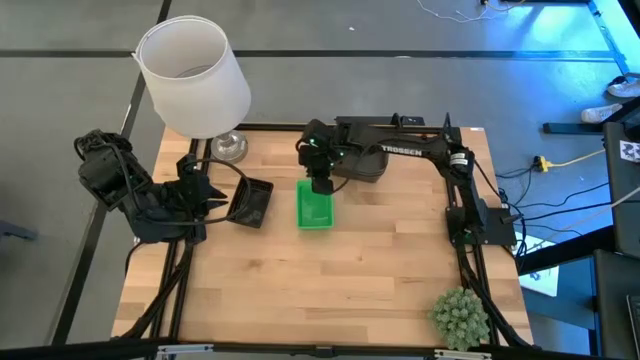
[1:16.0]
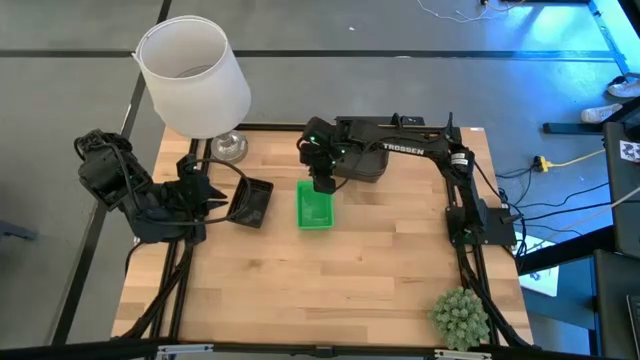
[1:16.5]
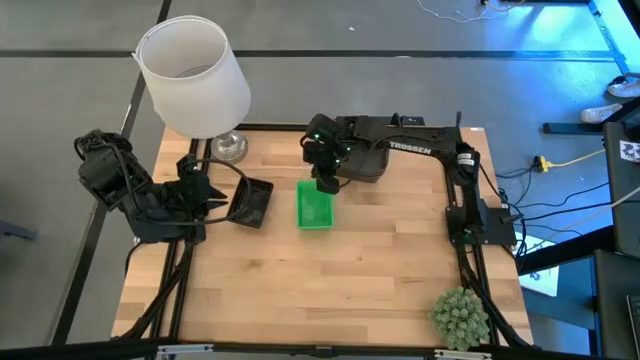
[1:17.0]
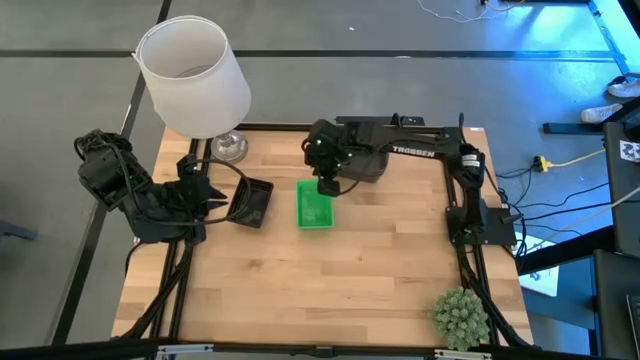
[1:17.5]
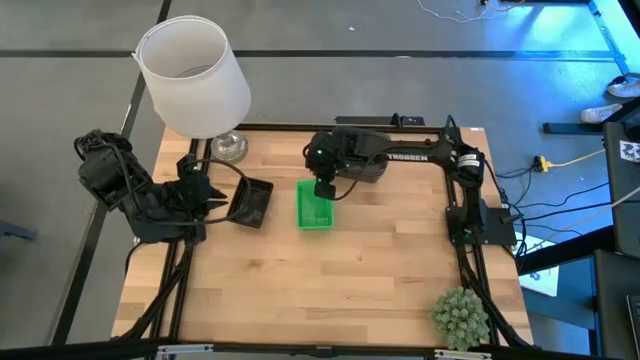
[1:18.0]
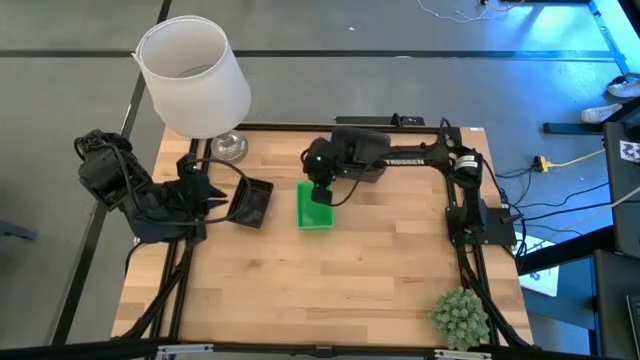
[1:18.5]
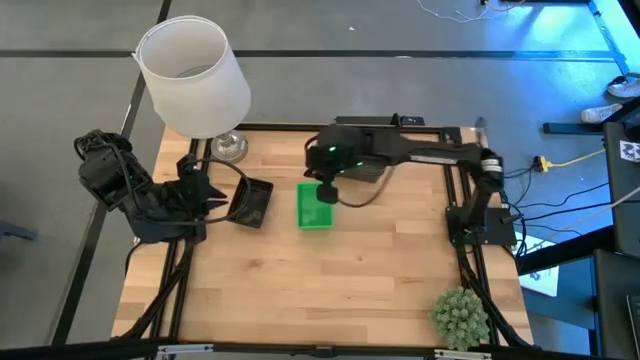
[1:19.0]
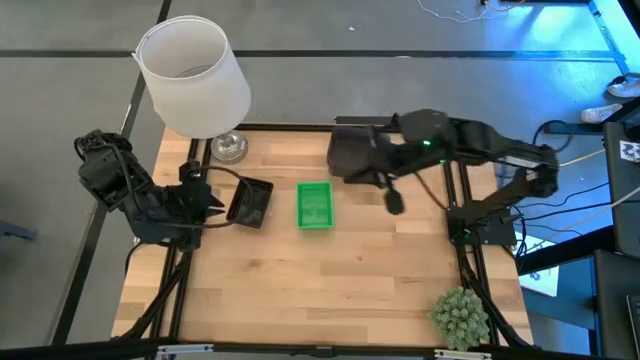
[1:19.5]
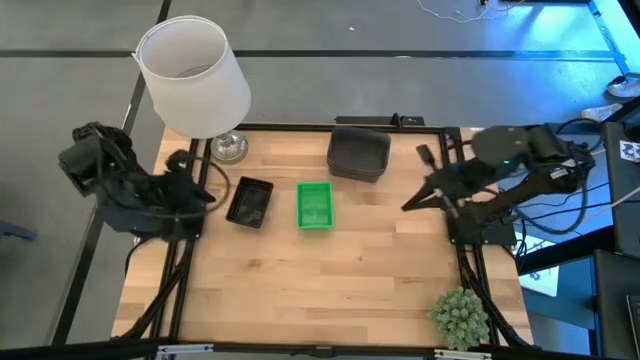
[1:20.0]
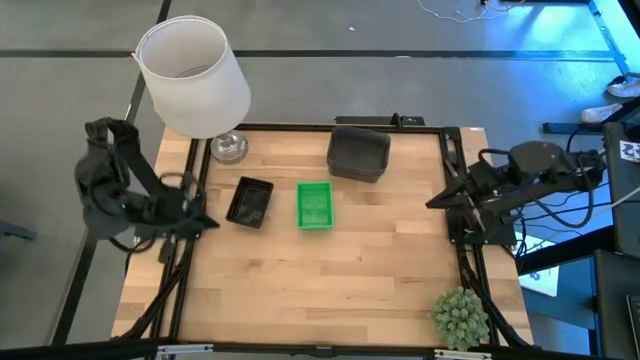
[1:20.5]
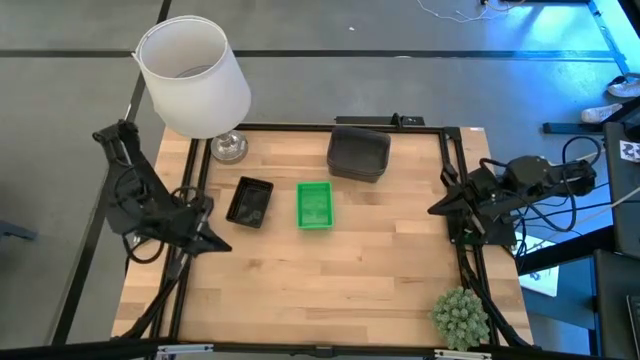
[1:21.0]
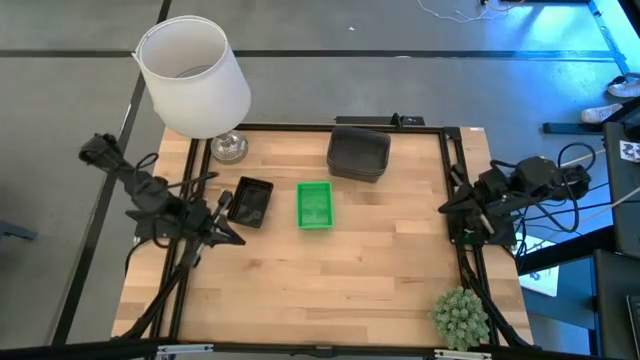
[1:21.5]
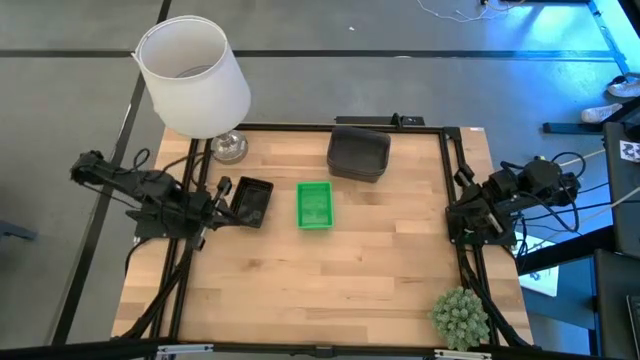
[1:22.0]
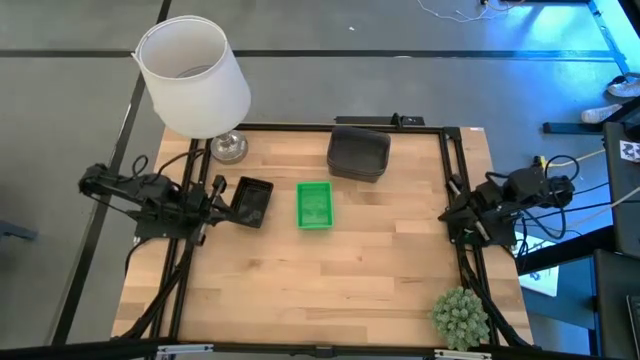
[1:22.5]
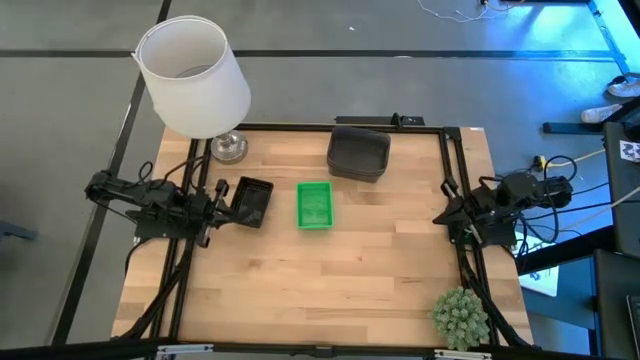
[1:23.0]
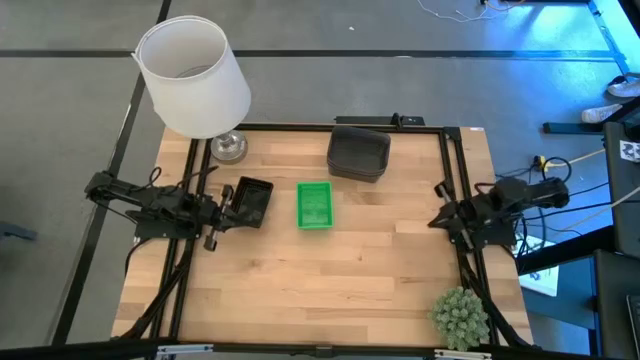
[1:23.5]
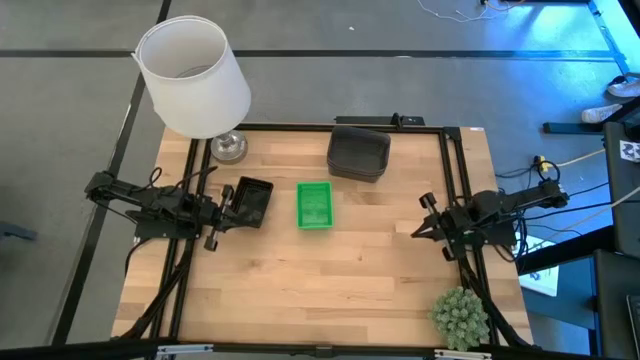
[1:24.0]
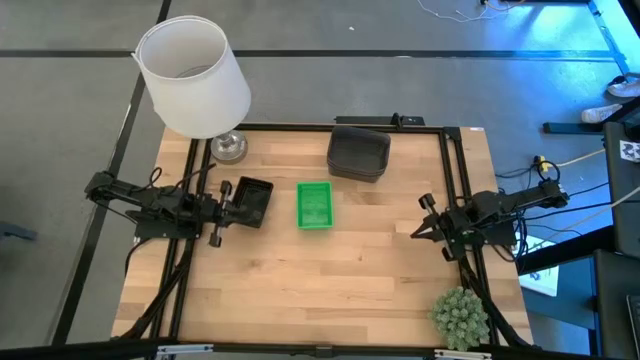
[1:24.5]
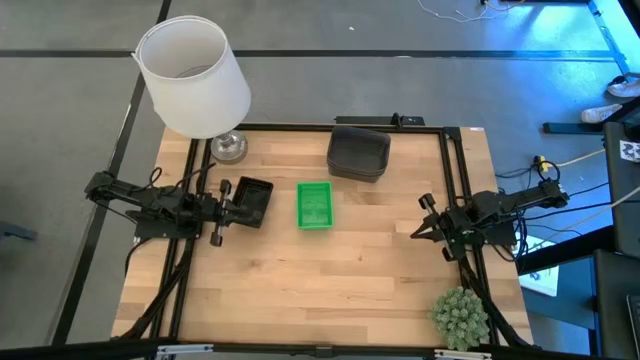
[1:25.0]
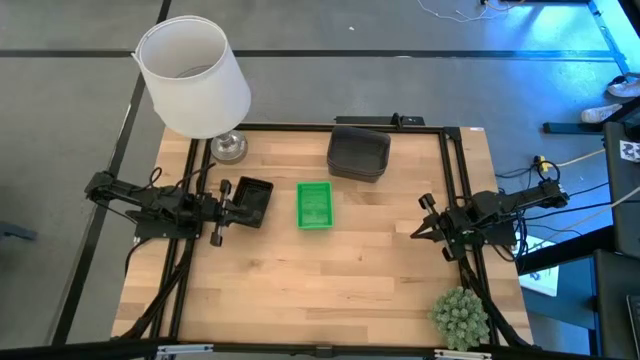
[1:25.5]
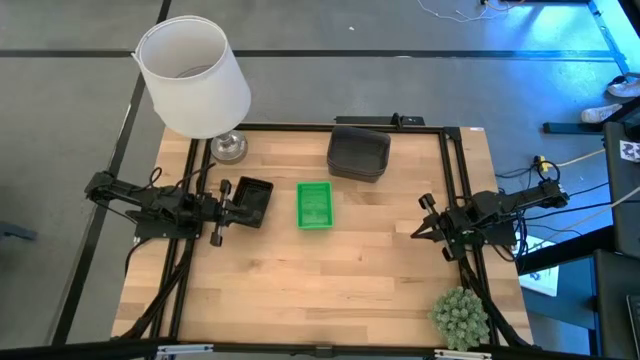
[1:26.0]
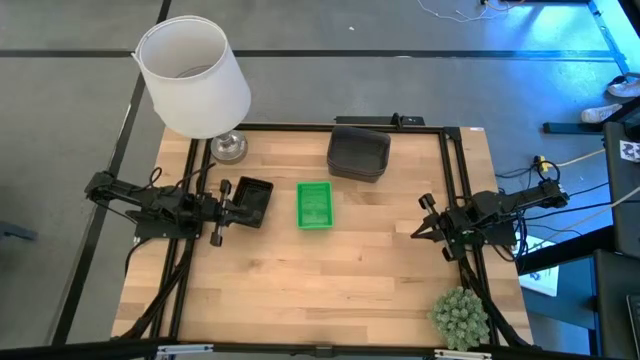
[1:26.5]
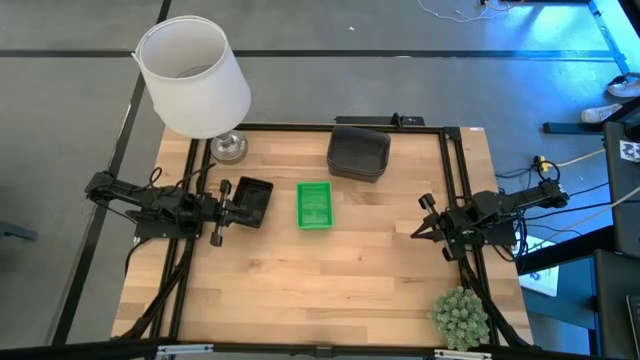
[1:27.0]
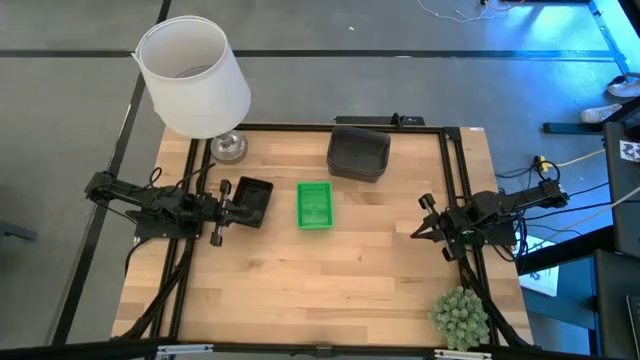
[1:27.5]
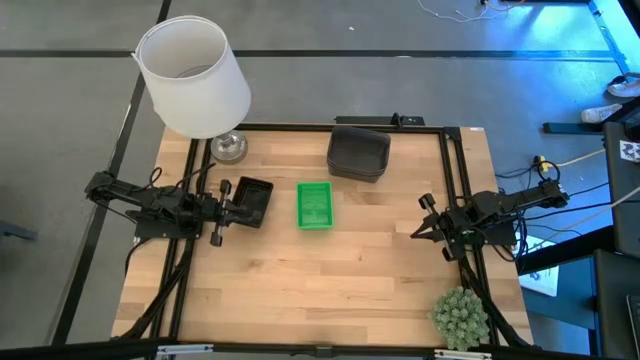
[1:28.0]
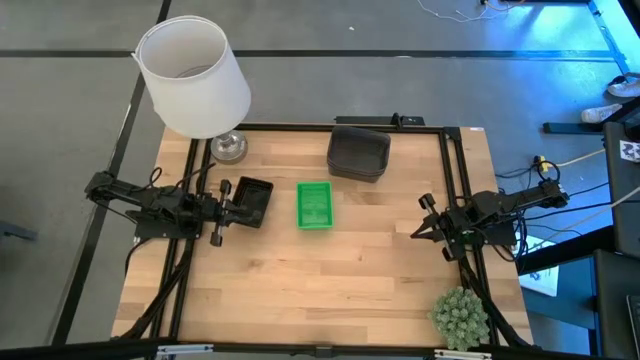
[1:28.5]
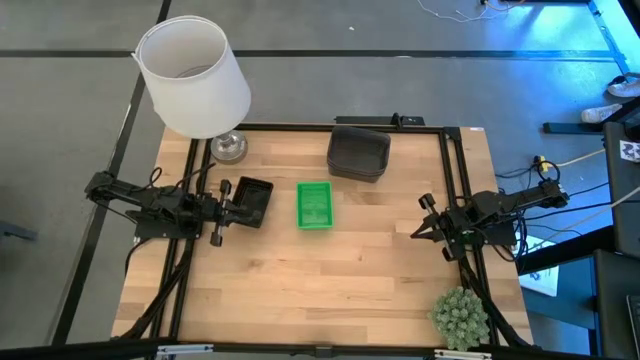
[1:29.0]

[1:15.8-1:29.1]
Return to Home Position

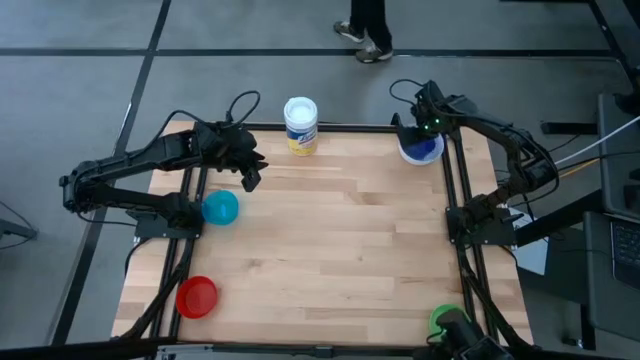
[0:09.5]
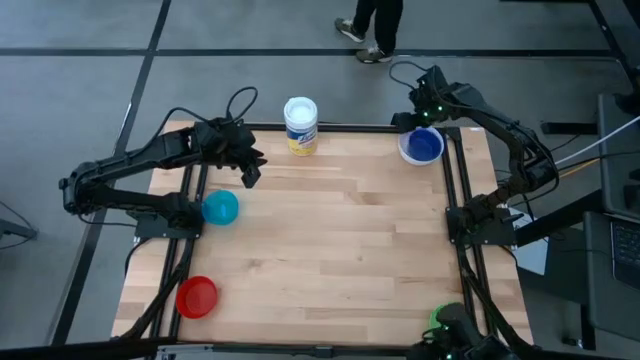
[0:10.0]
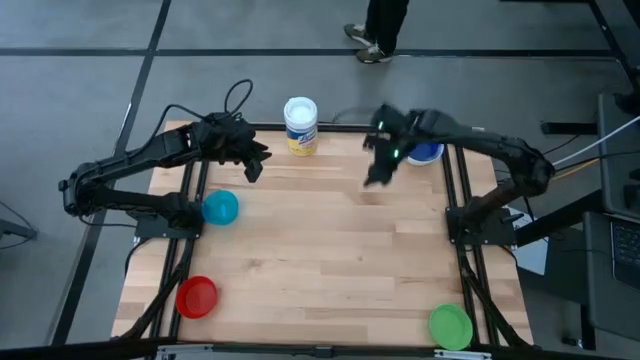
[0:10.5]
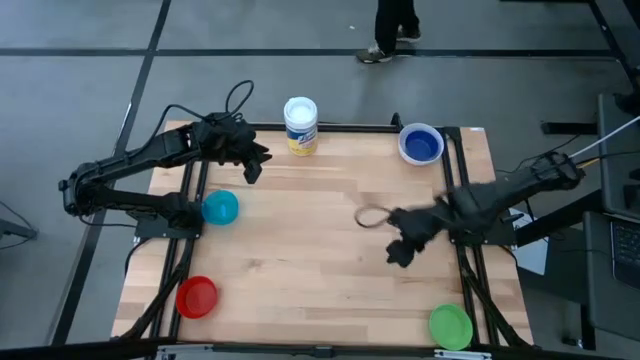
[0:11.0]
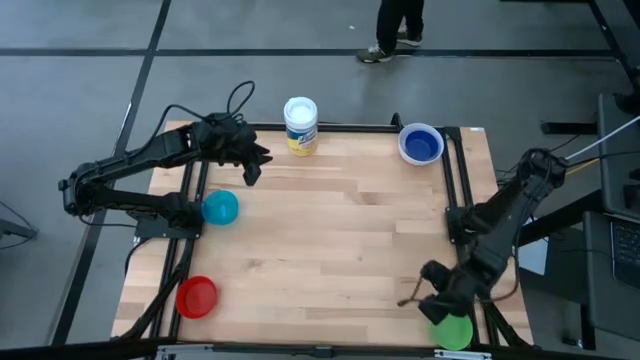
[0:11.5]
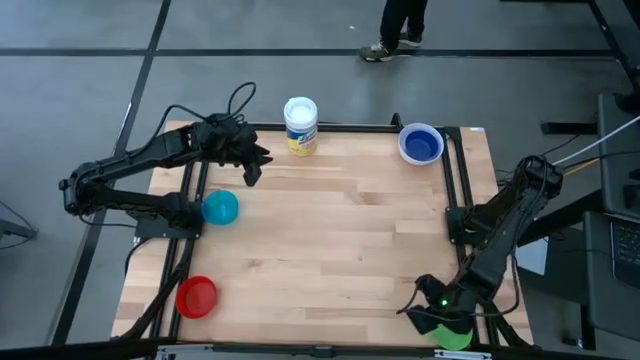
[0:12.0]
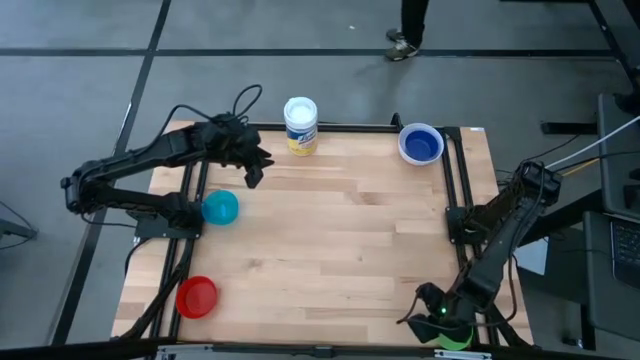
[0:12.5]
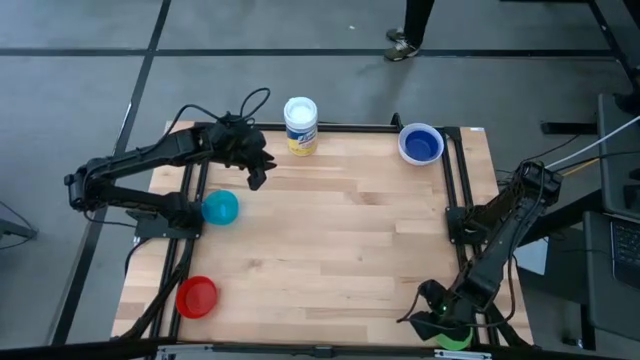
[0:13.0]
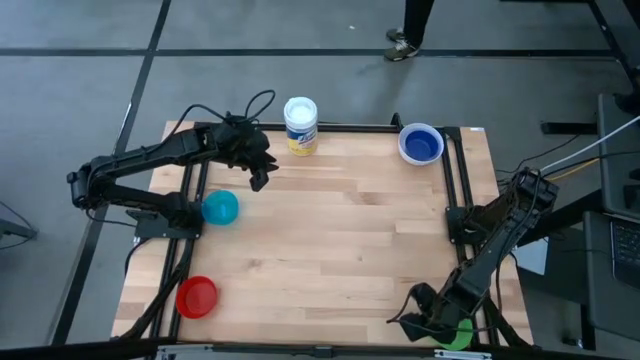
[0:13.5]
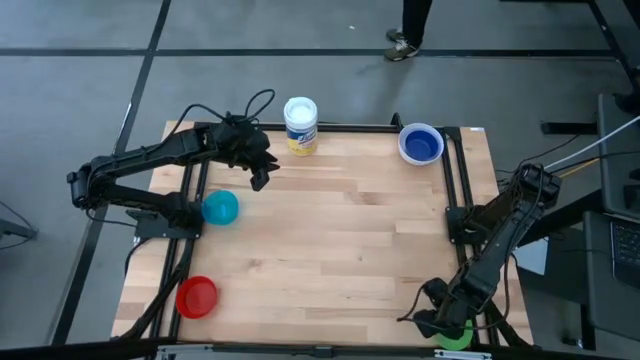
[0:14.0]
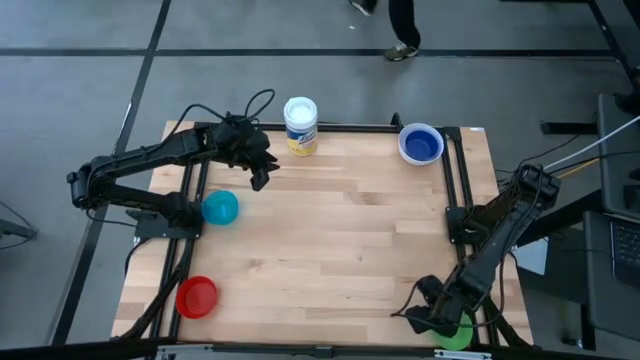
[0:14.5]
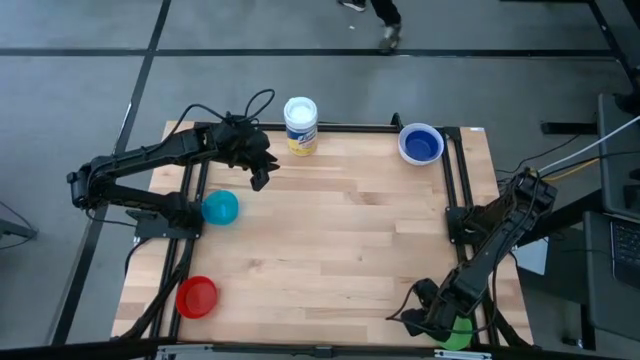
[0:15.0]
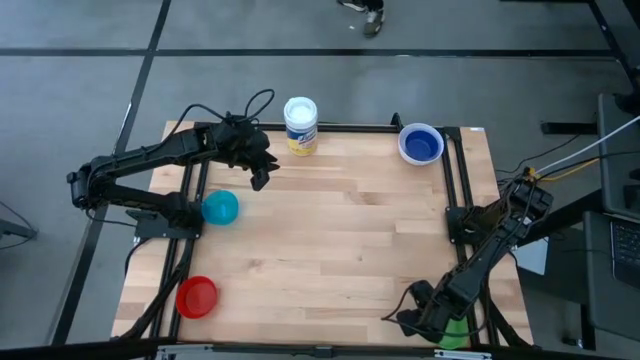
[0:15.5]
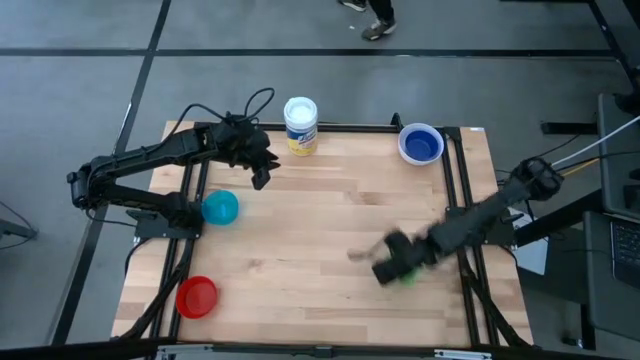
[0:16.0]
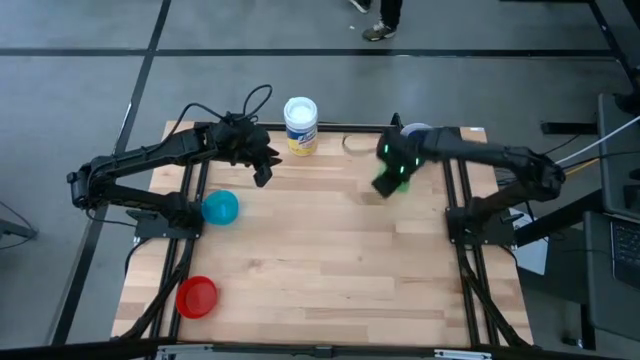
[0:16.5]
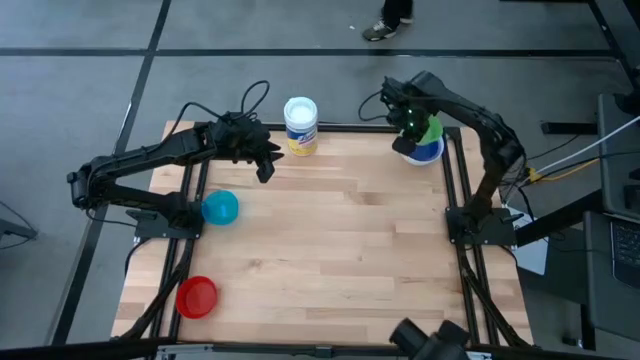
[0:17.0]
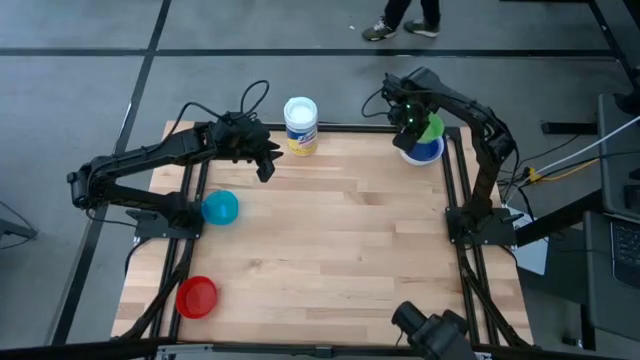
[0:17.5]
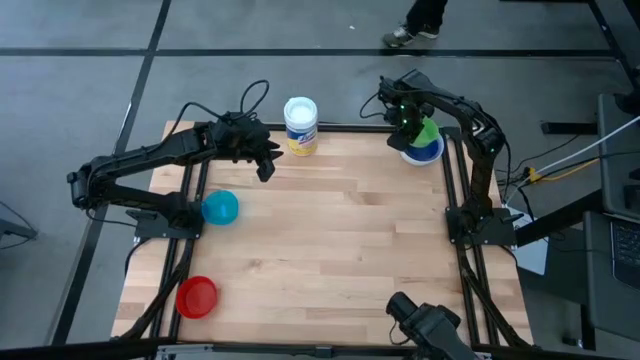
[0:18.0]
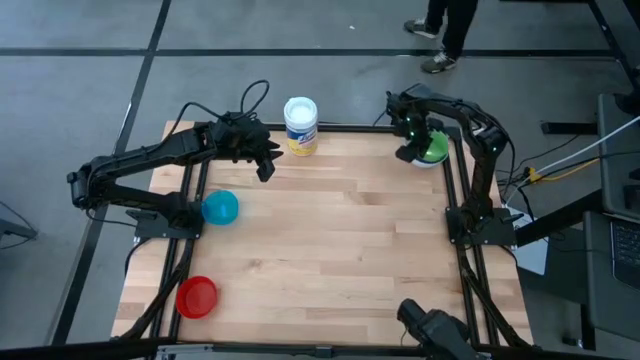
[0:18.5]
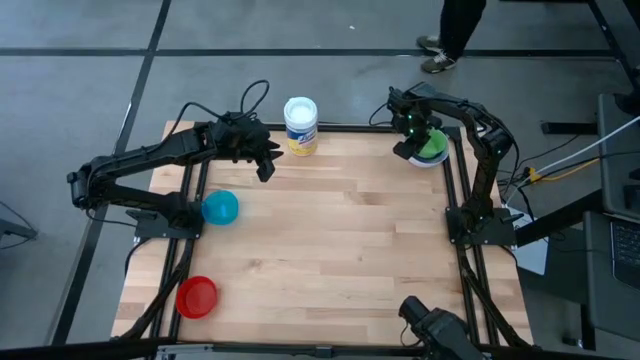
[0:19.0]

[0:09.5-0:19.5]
Stack the green bowl on top of the blue bowl
